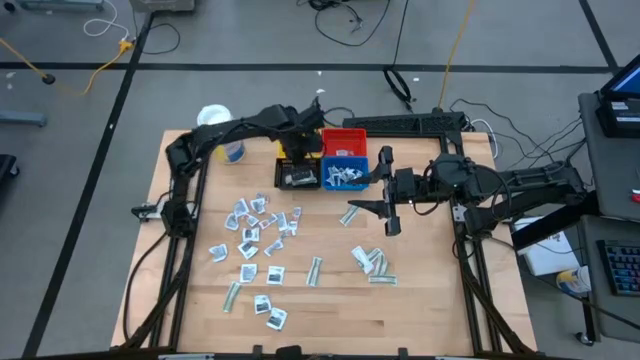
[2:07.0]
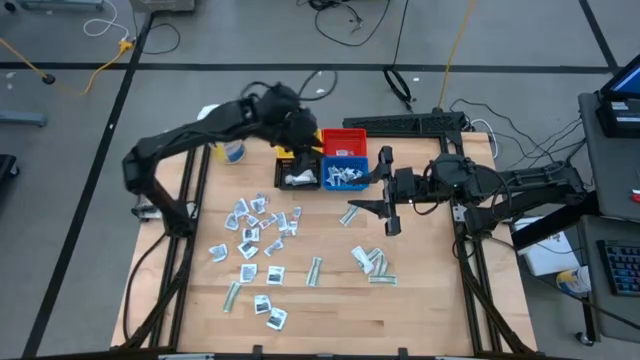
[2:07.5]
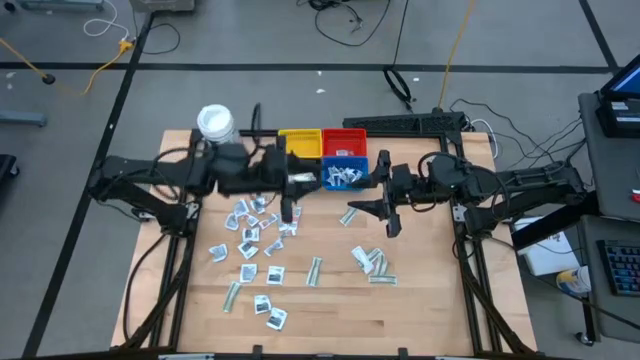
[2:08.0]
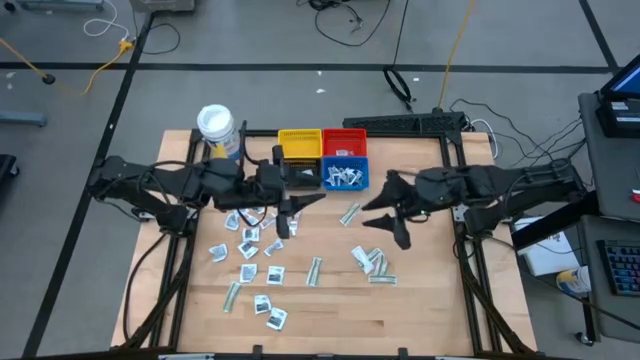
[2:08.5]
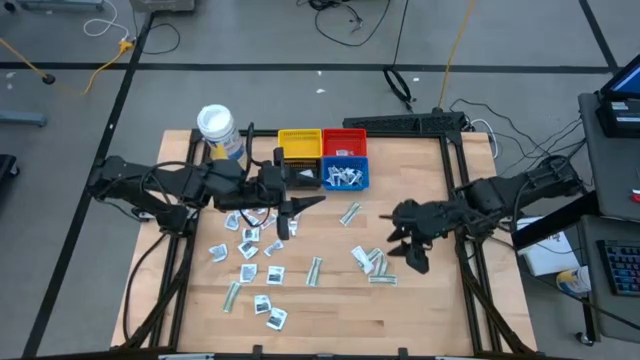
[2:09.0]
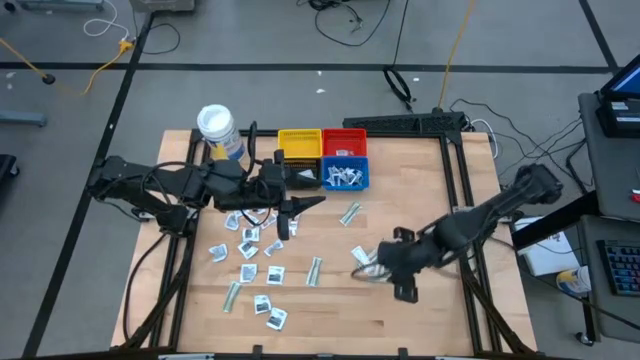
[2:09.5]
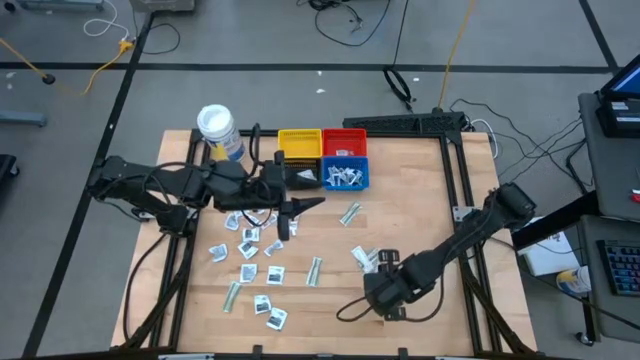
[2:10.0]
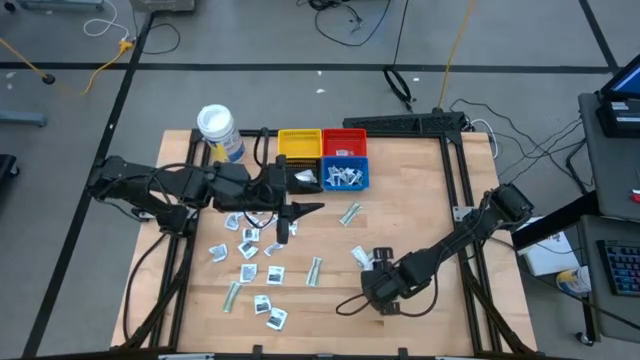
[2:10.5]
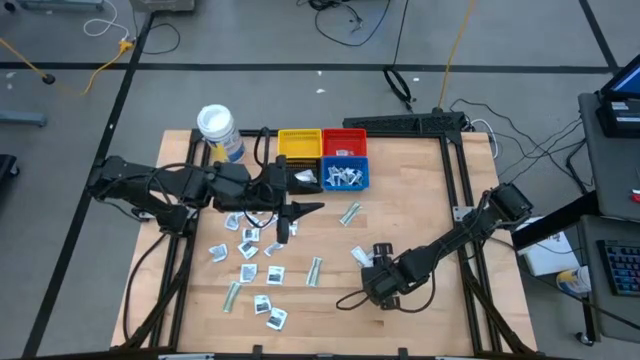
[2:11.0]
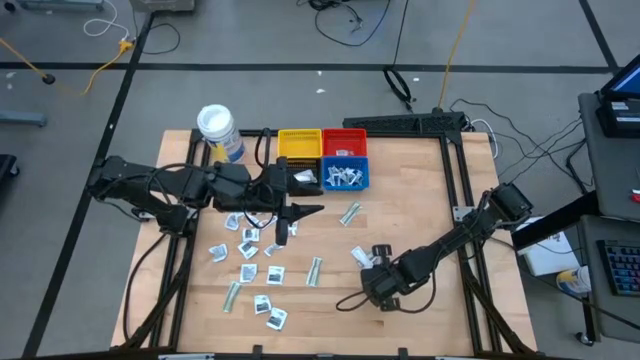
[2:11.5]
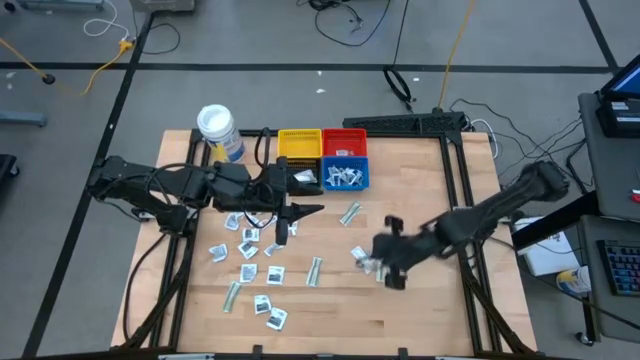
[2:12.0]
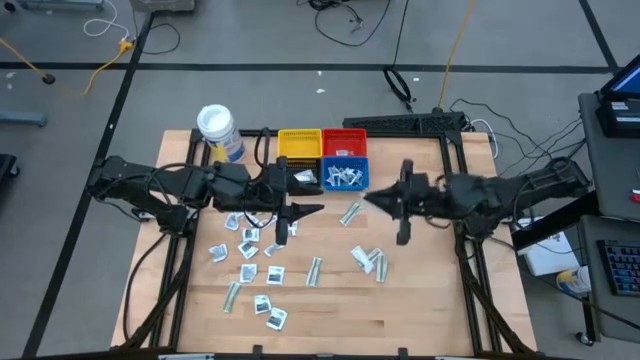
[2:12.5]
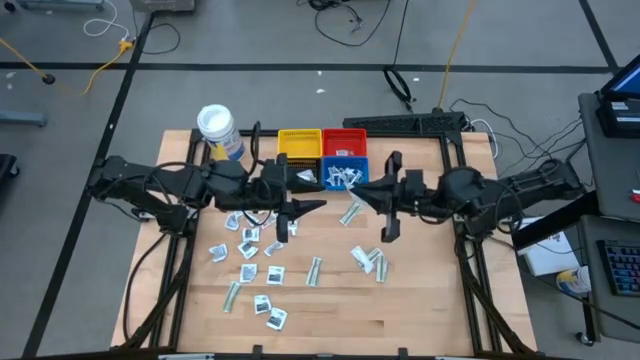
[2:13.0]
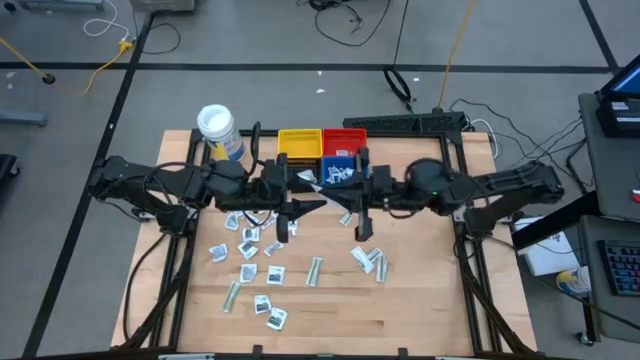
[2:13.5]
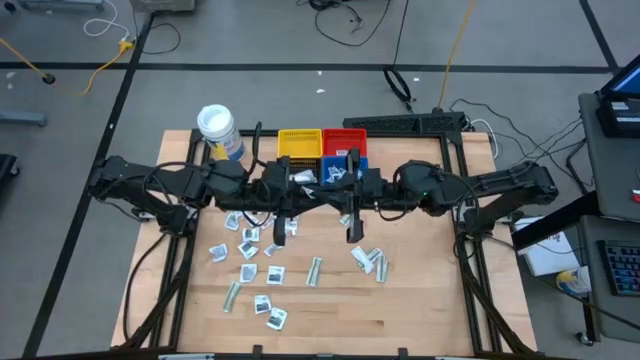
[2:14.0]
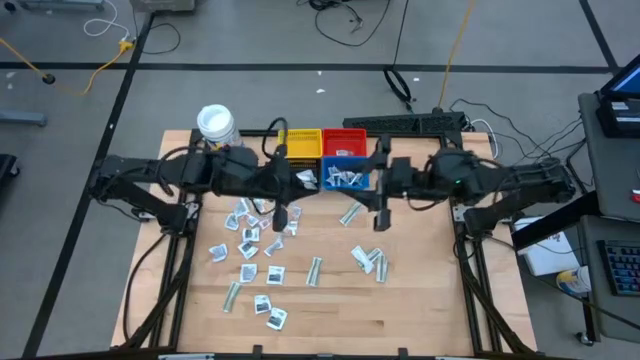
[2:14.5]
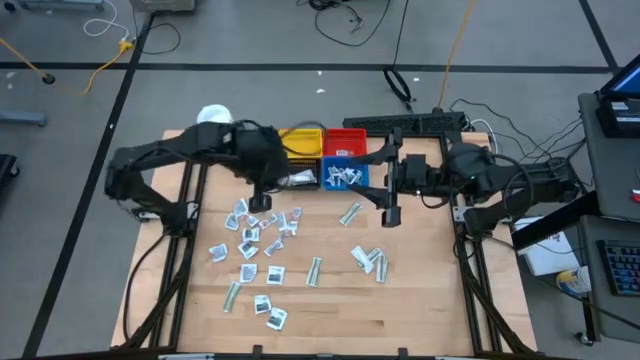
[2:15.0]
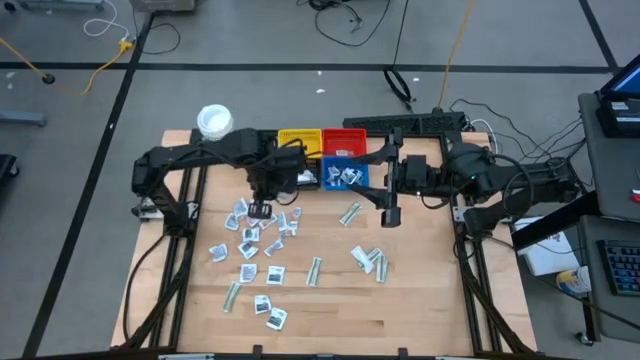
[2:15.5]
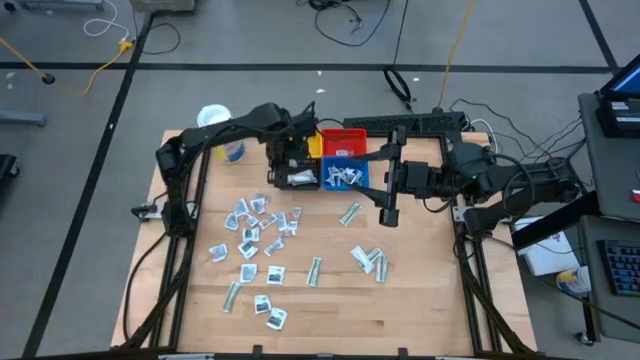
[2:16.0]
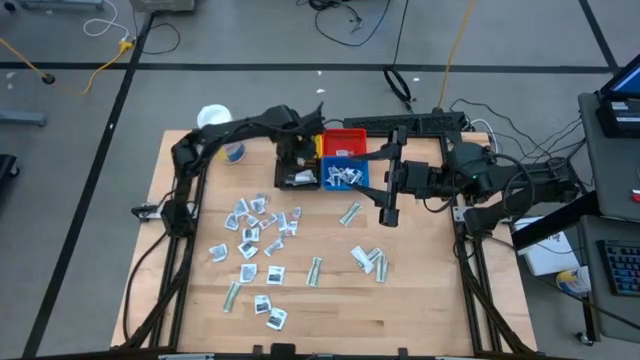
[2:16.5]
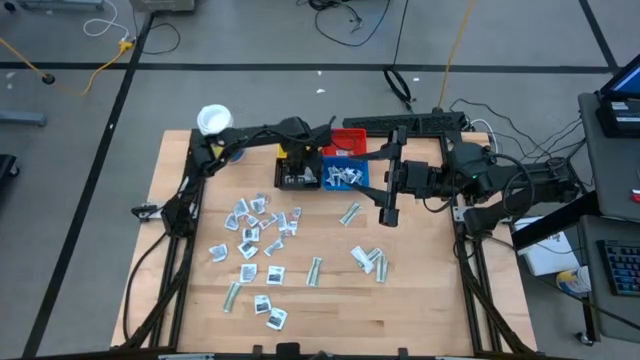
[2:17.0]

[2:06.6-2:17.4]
Task: Pick & Place First Aid Supplies
Put the green bandage pack into the black basket

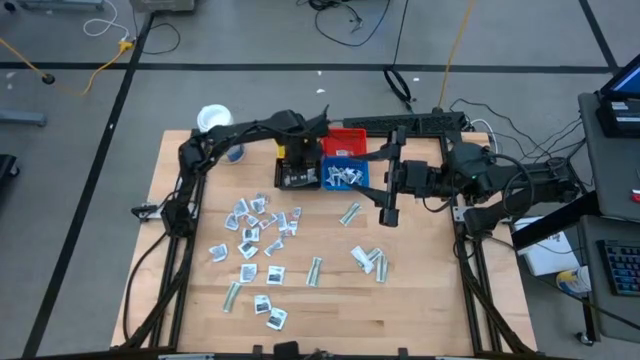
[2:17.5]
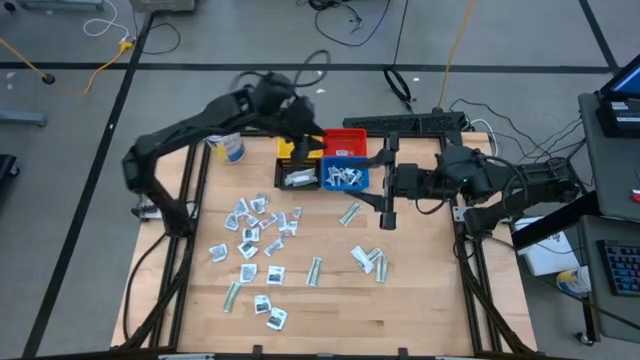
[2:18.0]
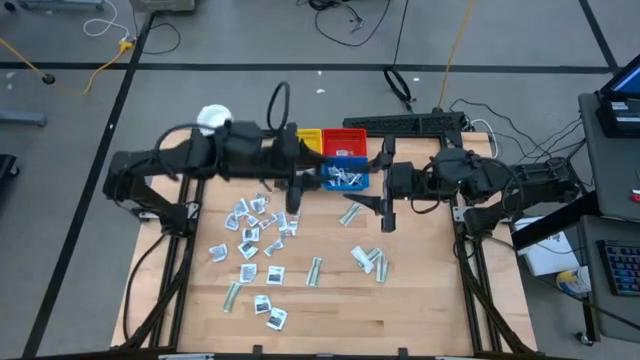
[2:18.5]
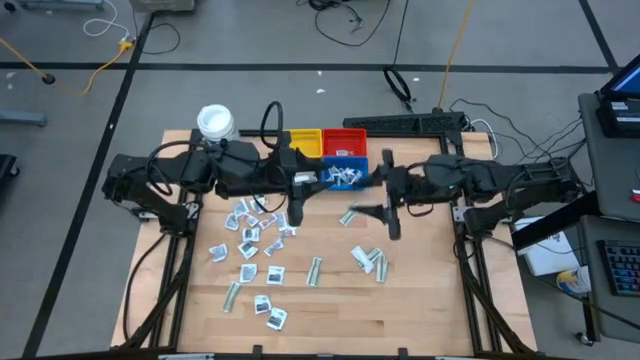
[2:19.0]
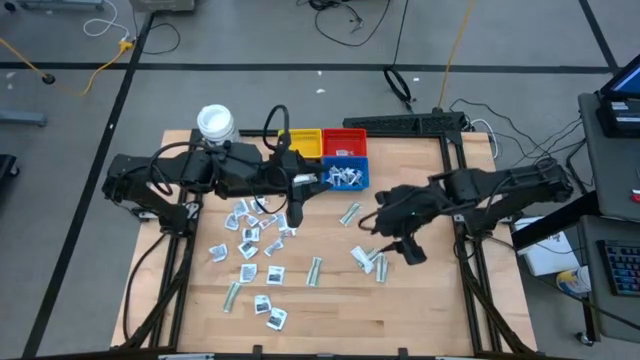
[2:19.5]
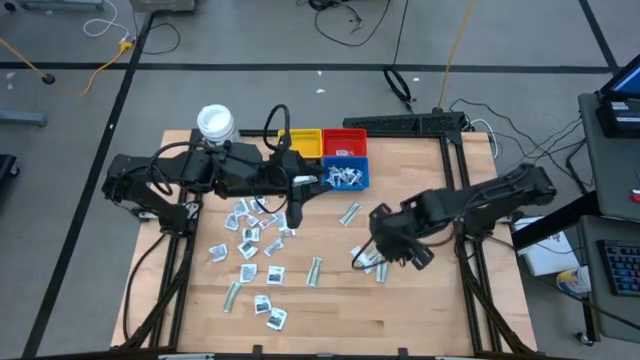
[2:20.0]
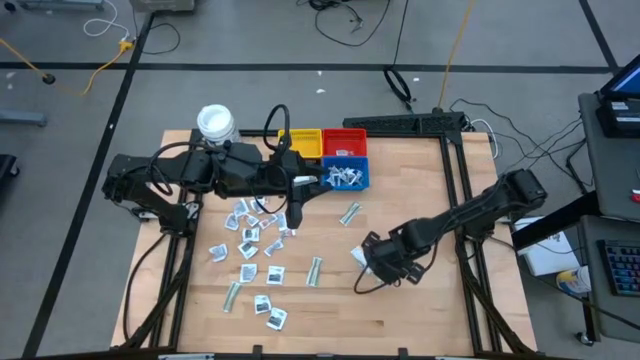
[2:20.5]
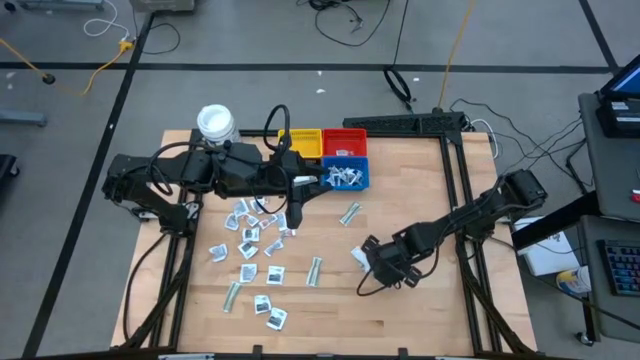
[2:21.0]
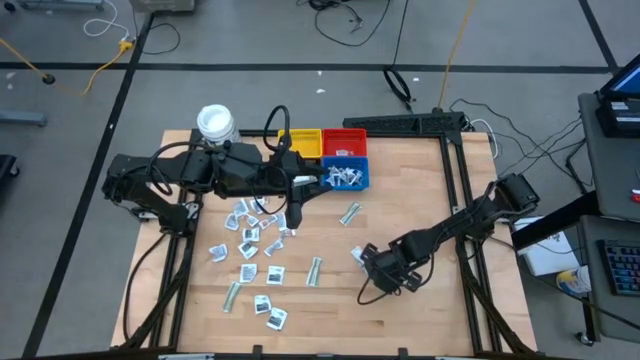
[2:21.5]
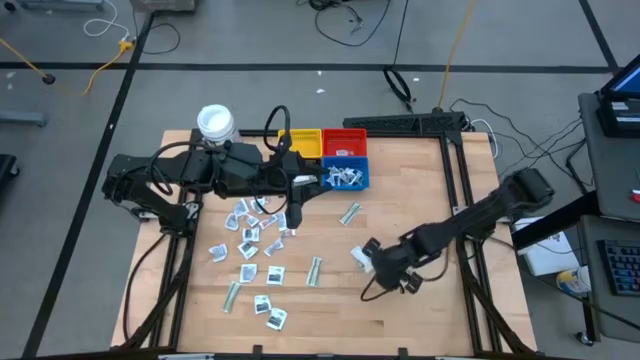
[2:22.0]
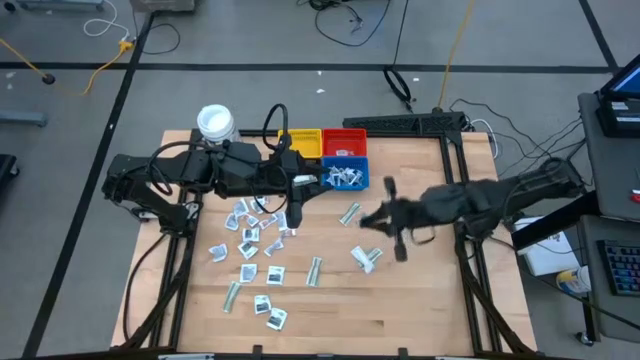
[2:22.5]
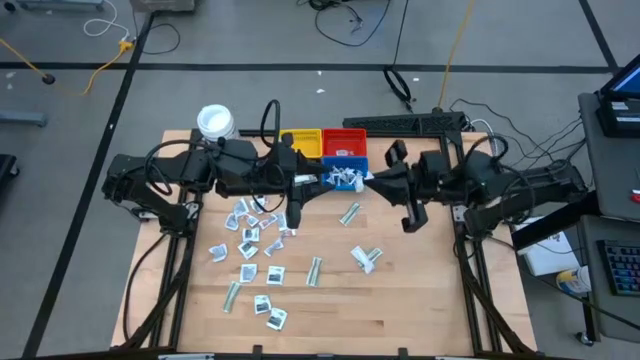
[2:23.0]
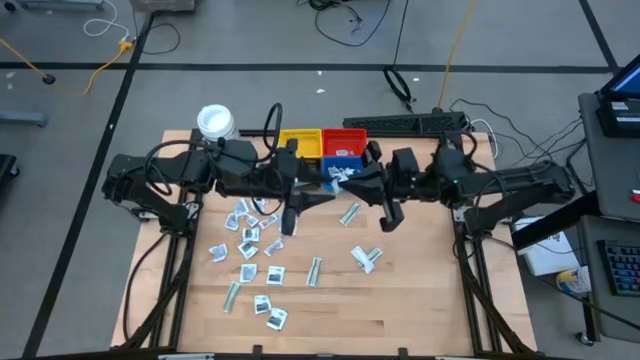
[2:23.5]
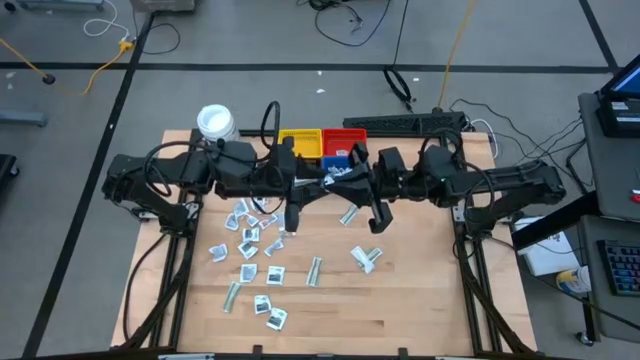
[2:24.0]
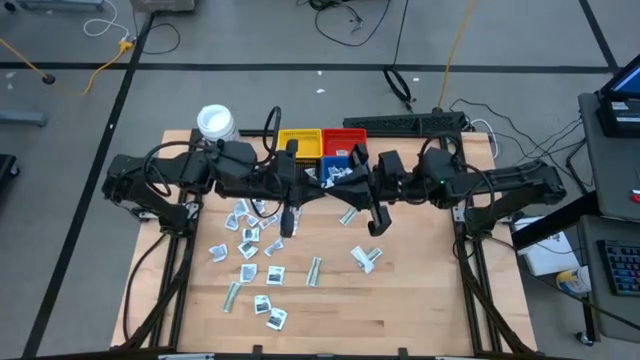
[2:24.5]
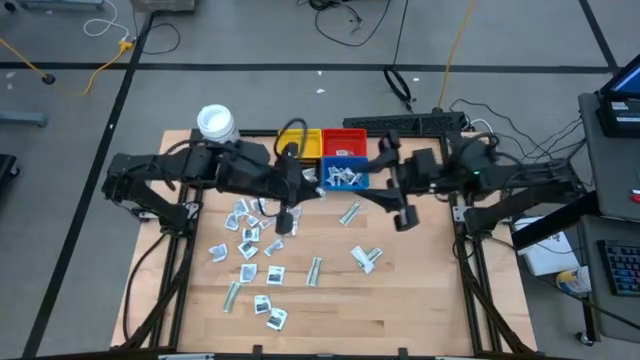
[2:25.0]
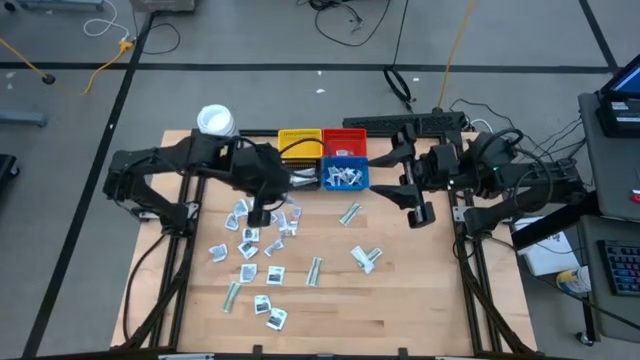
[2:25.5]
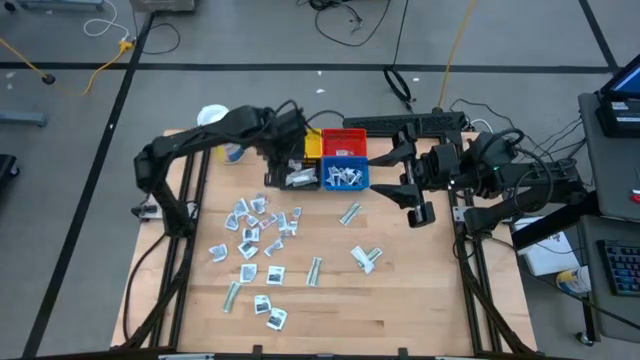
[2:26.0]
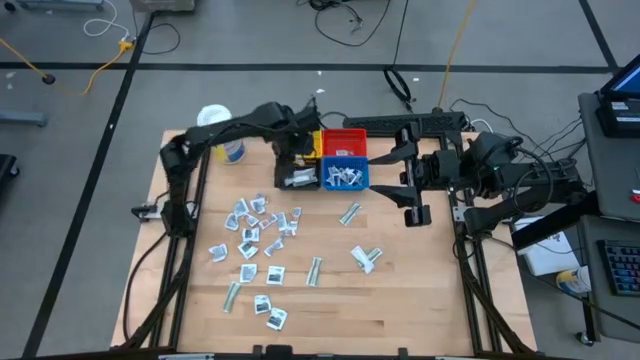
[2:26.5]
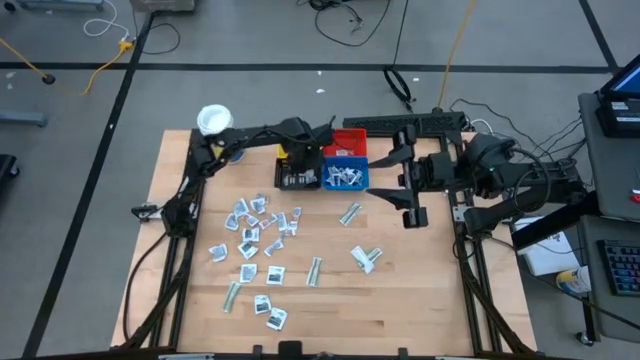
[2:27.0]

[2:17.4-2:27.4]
Put the green bandage pack into the black basket

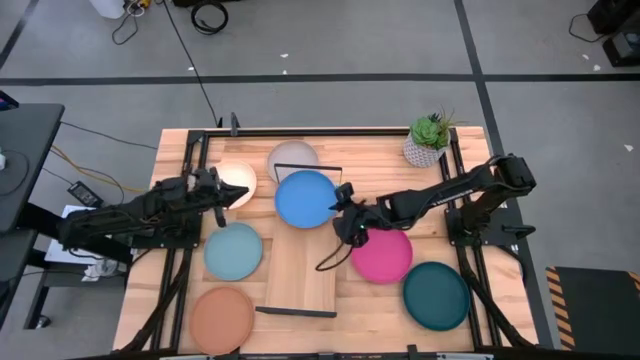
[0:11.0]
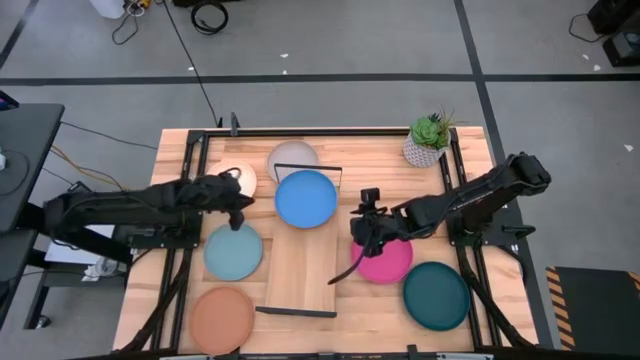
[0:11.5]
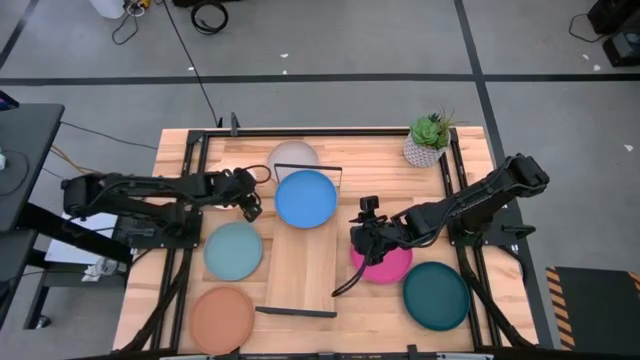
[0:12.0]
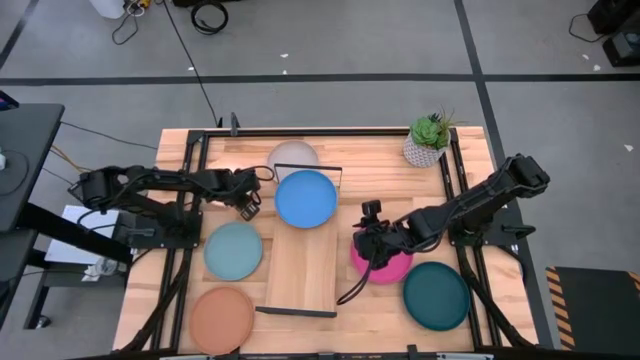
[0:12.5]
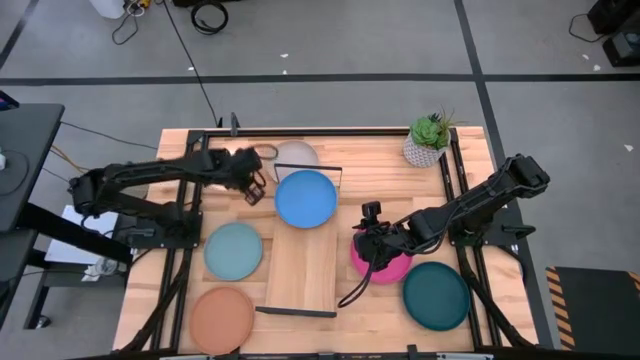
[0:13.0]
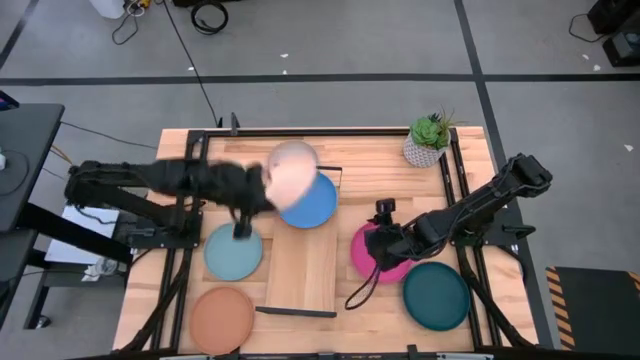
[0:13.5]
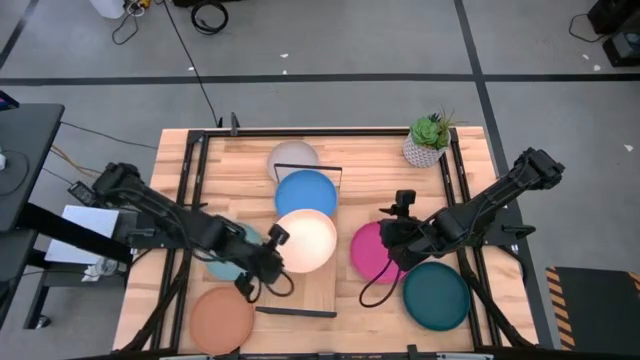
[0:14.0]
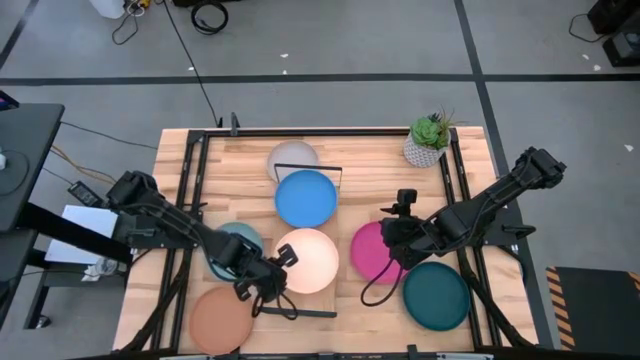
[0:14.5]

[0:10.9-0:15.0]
Task: Place and stack plates onto a shelf
Put the white plate on the shelf
